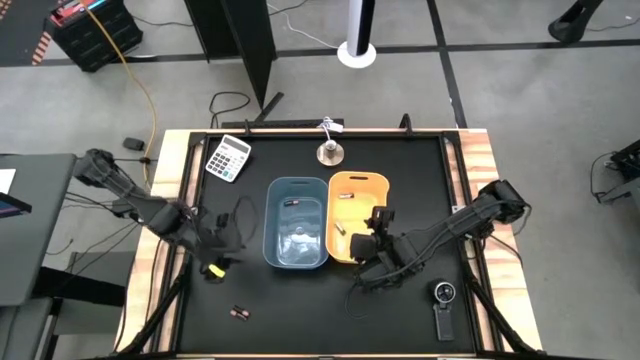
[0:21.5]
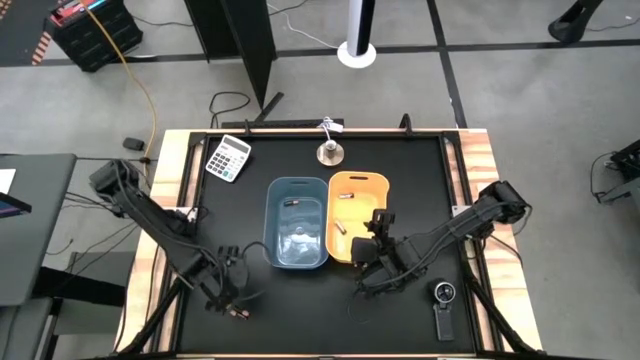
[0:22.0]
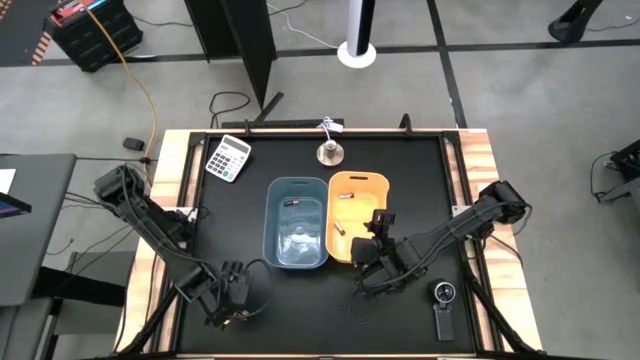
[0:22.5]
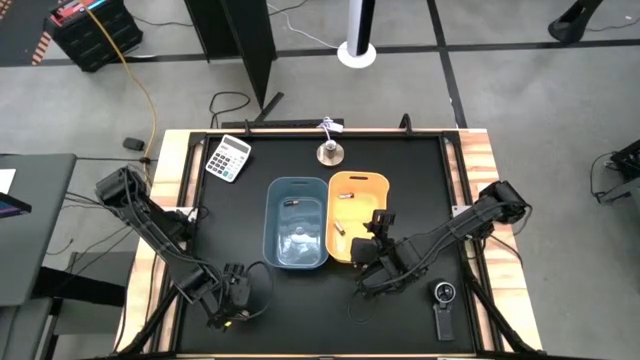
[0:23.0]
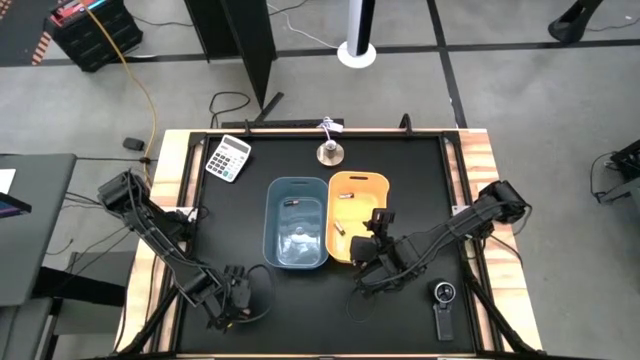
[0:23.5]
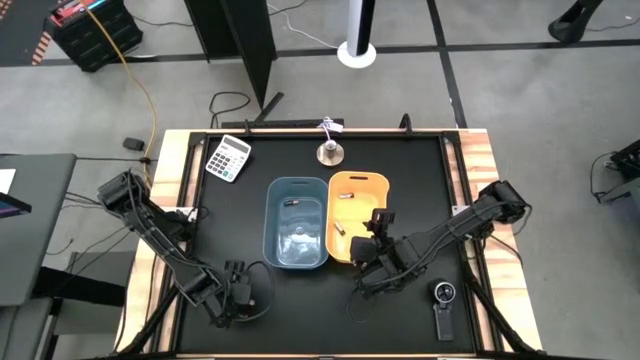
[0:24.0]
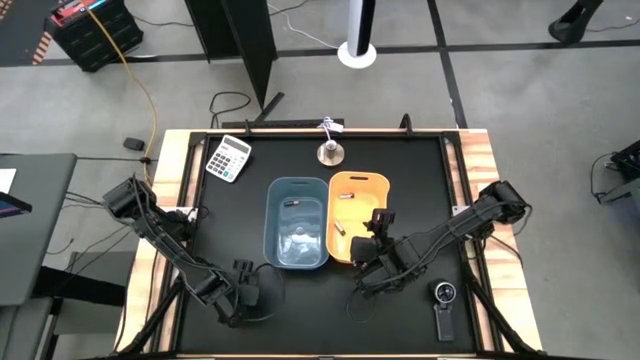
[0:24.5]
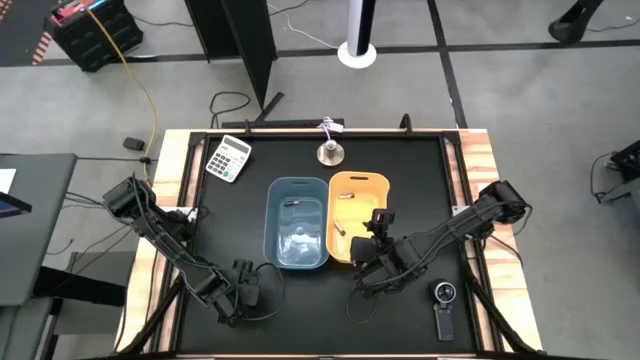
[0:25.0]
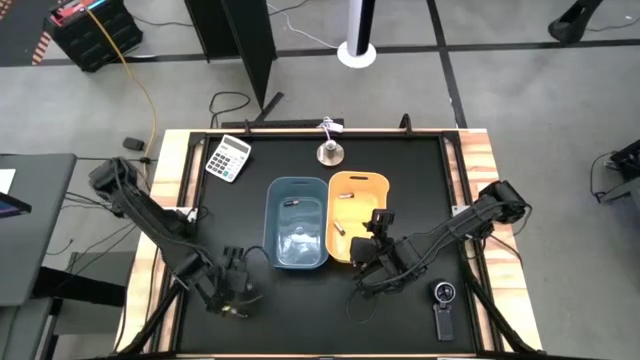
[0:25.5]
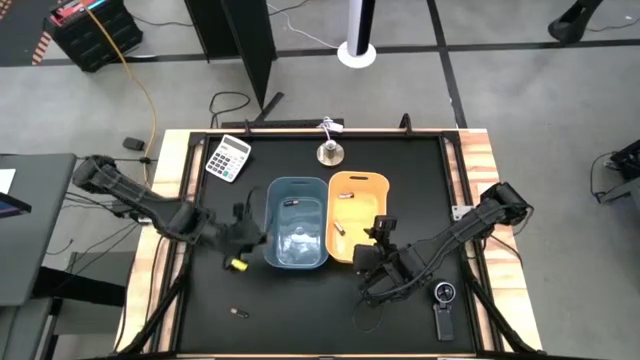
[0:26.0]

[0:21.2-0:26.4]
Task: Sort batteries
Put the top duracell battery into the blue bin

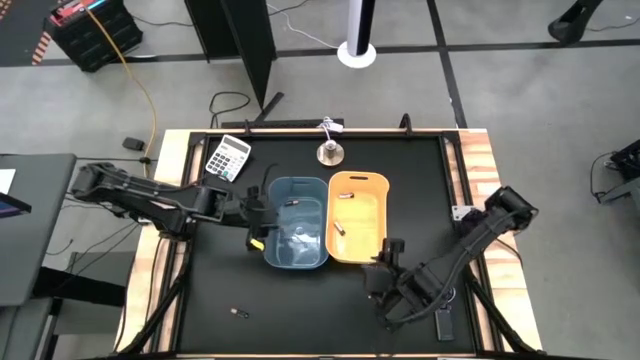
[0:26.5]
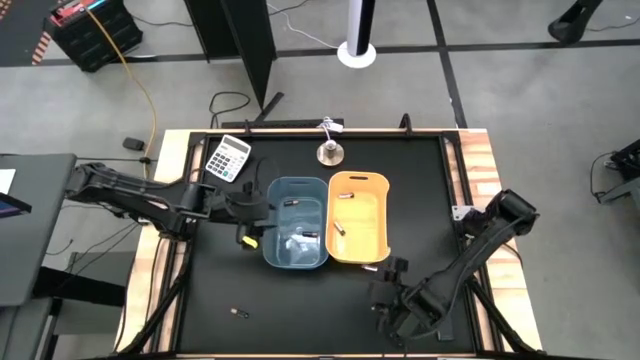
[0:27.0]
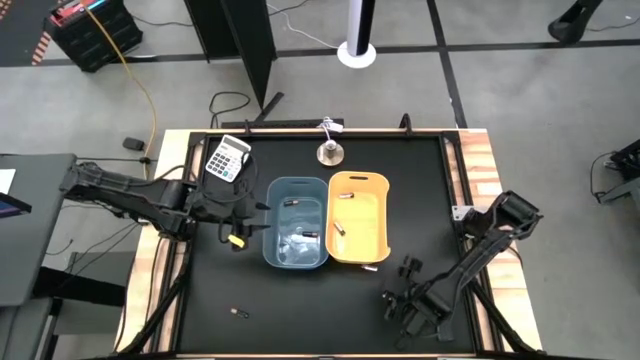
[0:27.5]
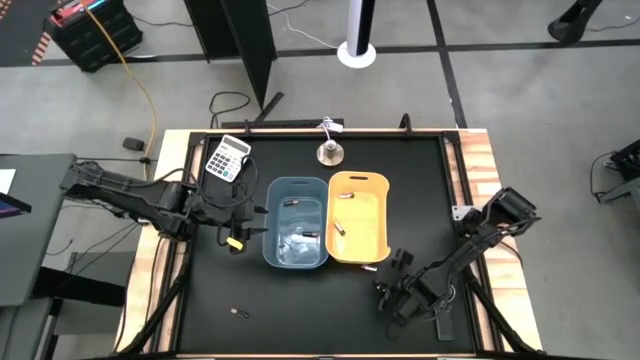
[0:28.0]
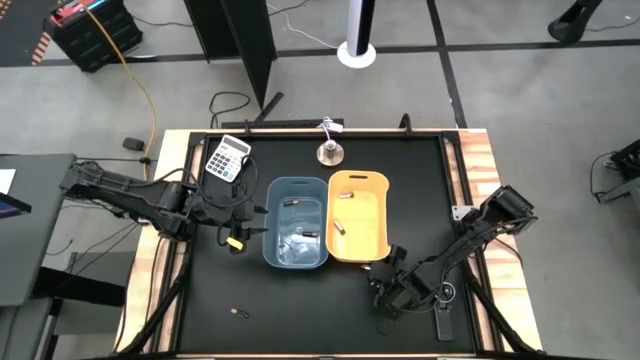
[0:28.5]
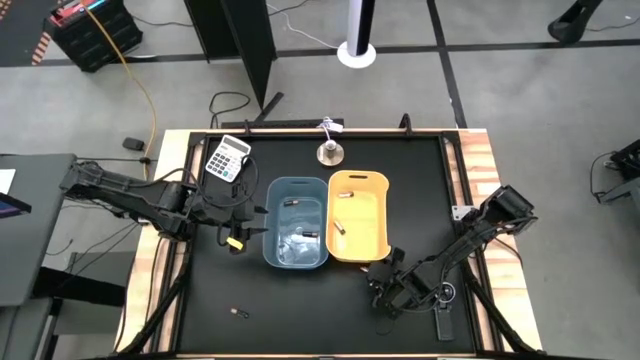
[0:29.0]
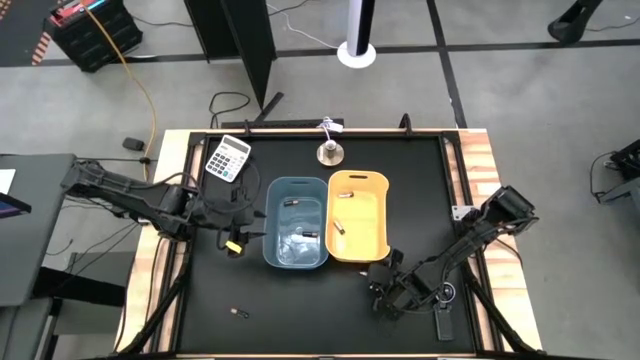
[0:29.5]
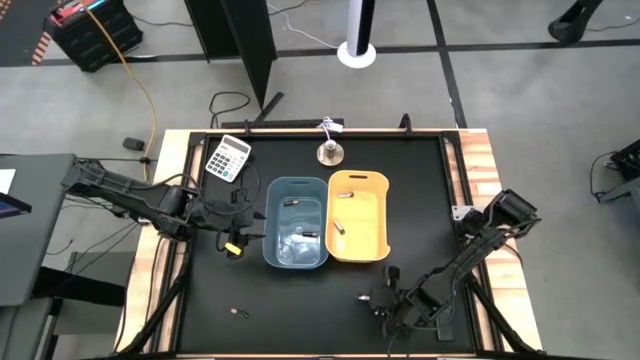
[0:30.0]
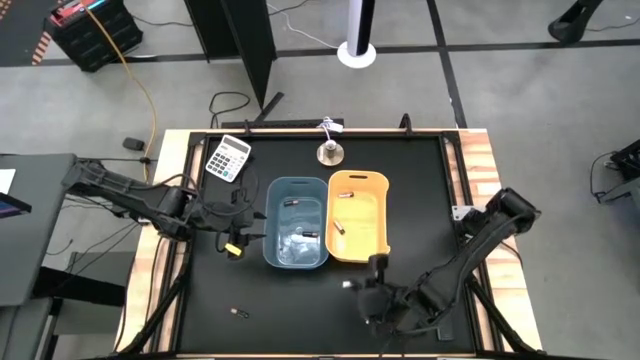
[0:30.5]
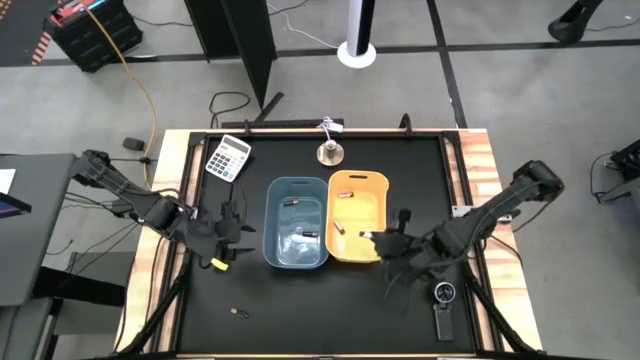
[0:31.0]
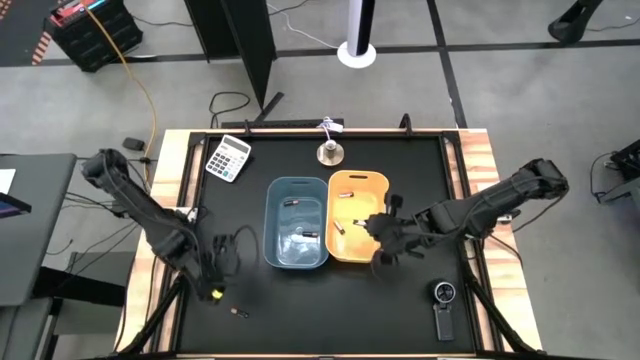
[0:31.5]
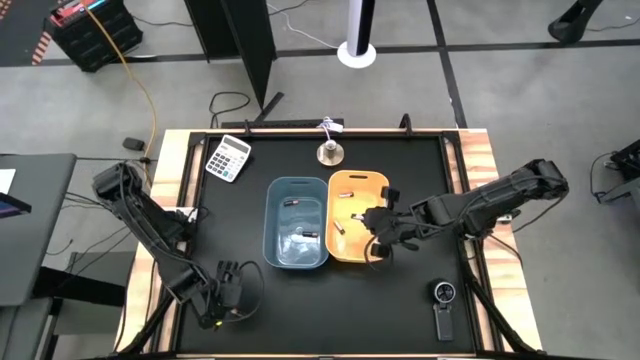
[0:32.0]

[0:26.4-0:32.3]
Put the black battery into the yellow bin

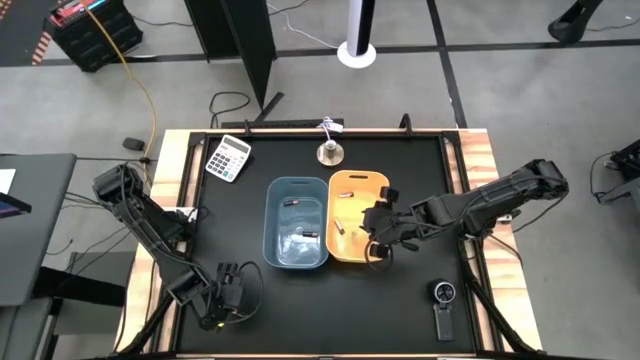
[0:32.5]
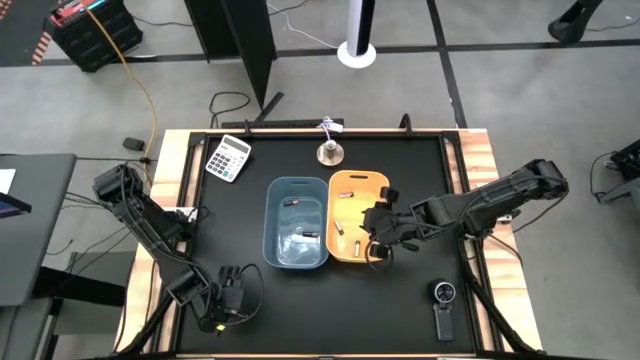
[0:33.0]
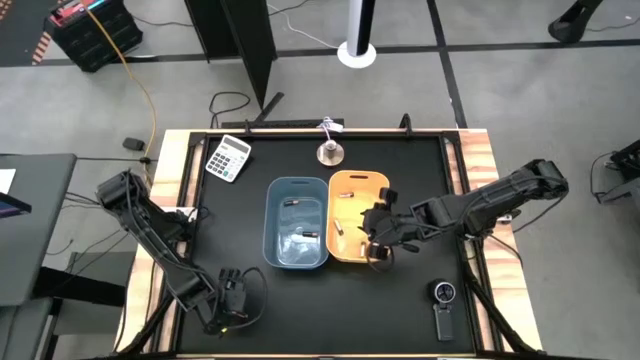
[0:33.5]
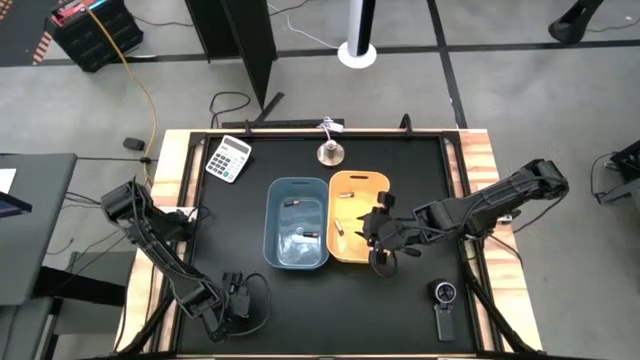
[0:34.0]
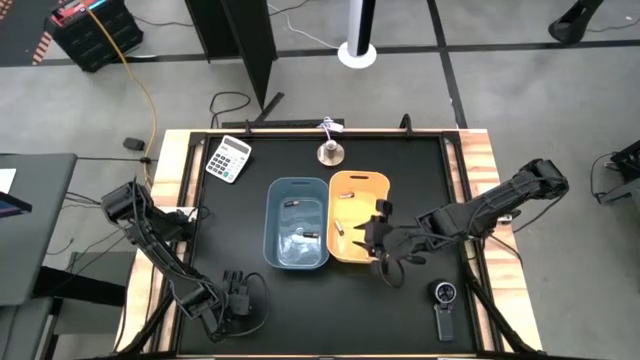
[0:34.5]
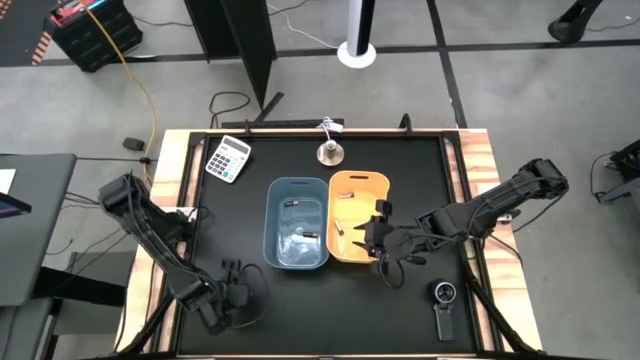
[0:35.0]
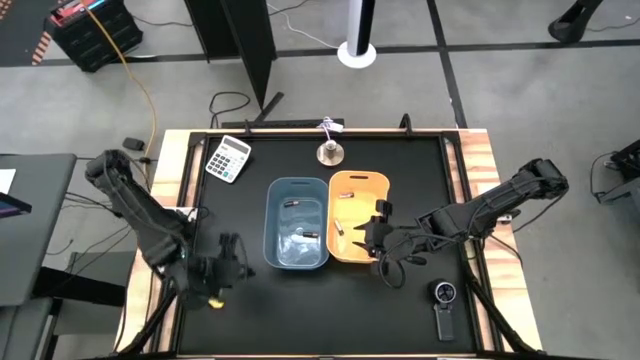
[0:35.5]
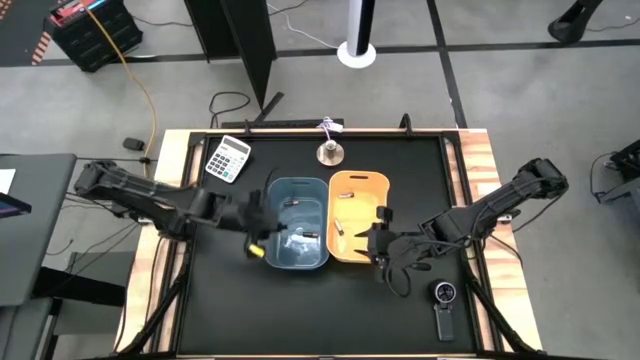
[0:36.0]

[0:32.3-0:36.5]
Put the black battery into the blue bin

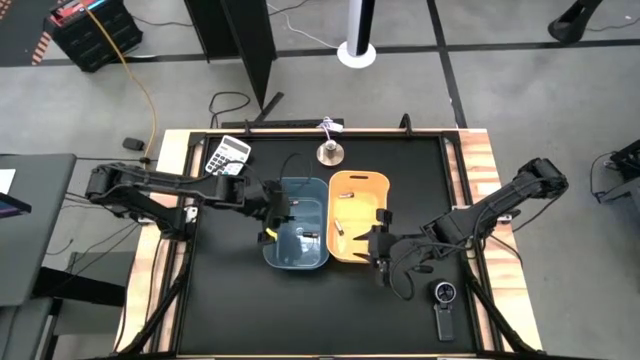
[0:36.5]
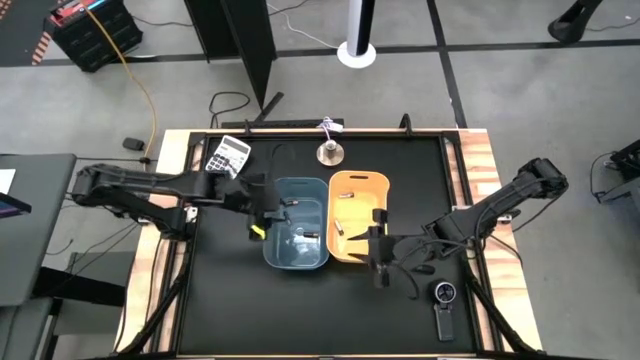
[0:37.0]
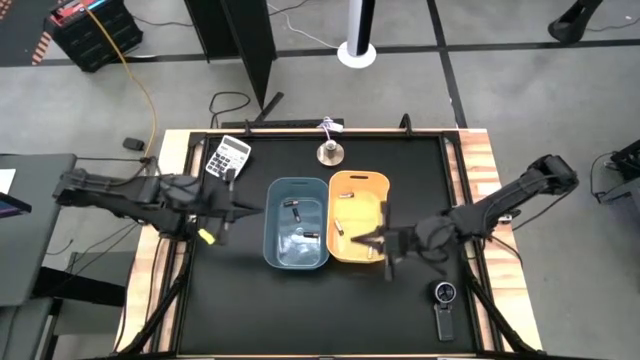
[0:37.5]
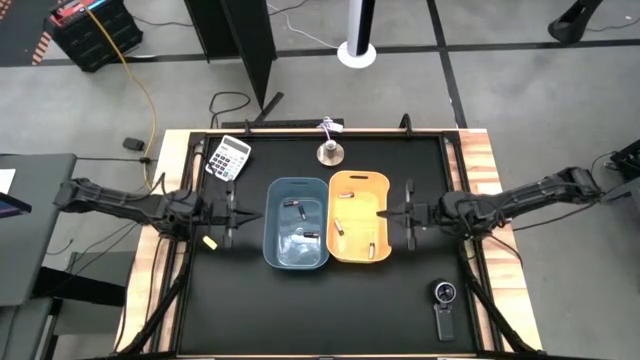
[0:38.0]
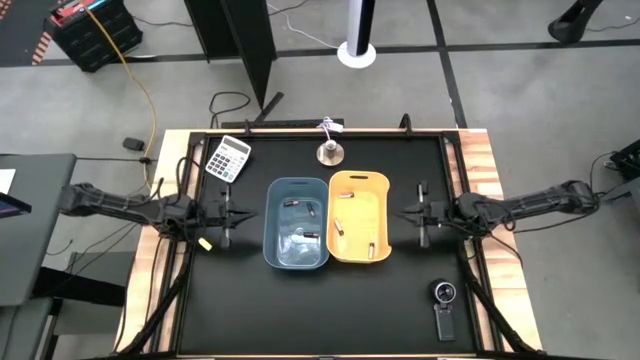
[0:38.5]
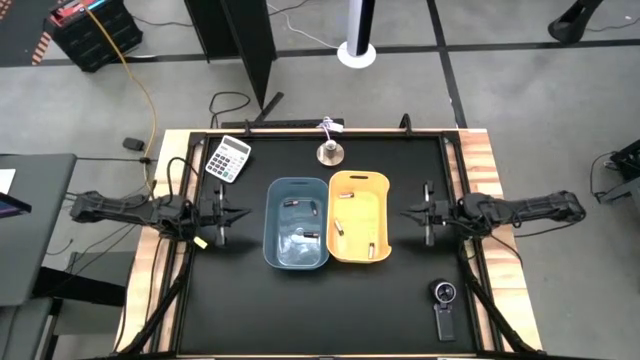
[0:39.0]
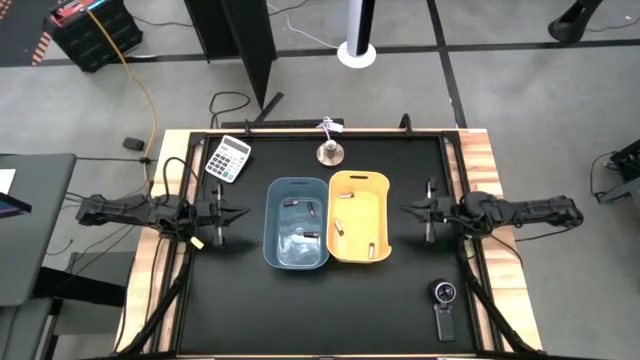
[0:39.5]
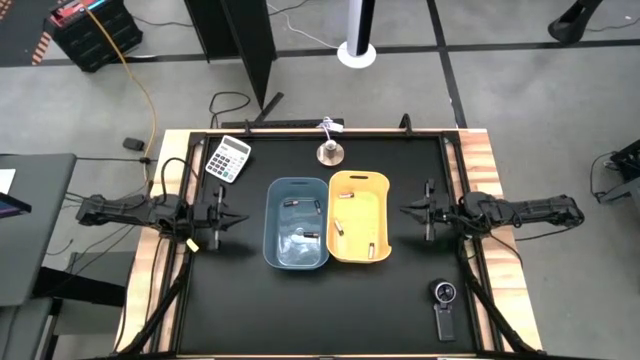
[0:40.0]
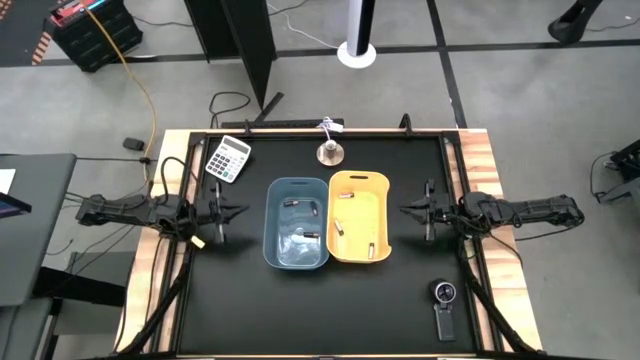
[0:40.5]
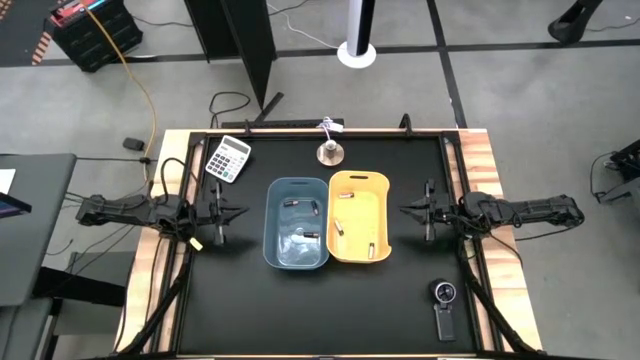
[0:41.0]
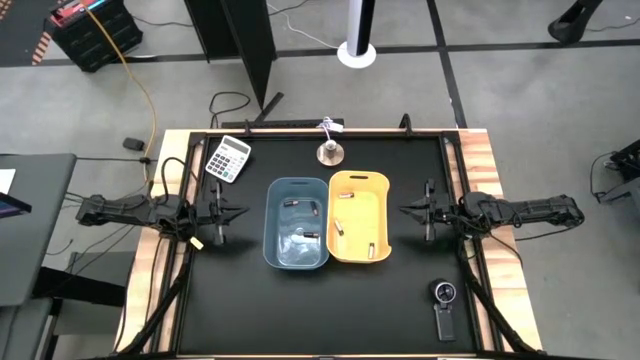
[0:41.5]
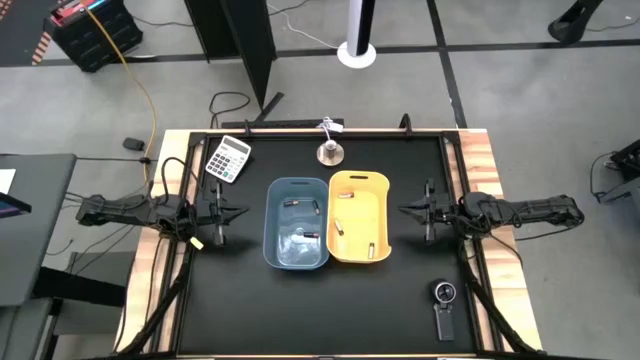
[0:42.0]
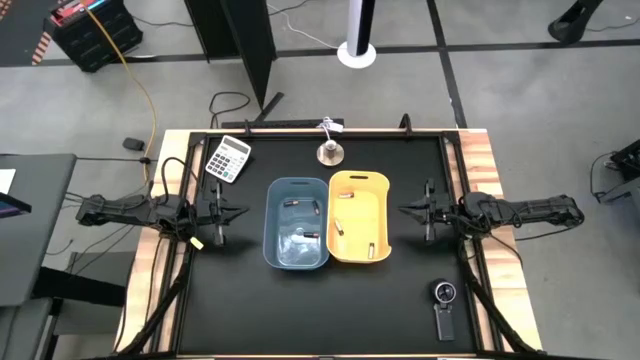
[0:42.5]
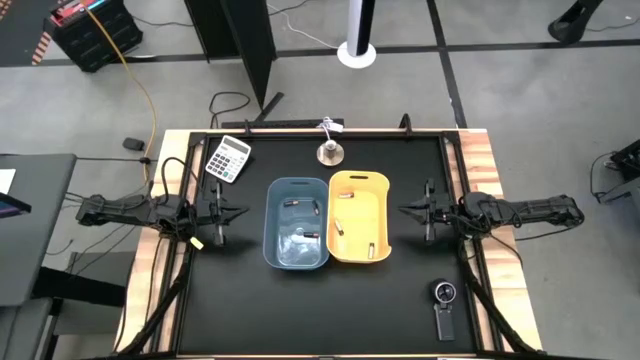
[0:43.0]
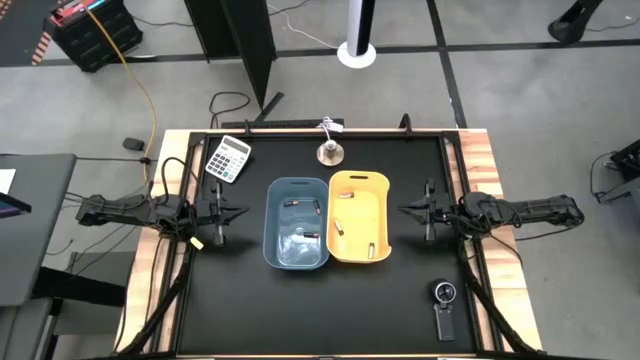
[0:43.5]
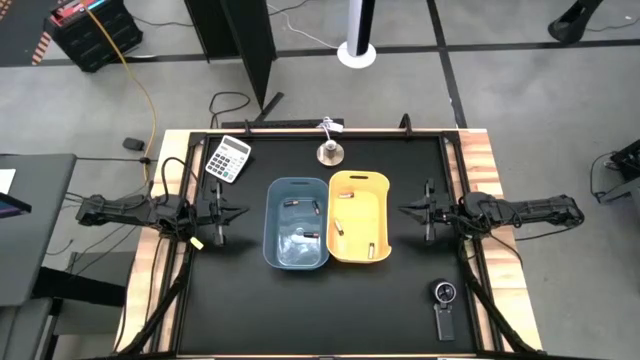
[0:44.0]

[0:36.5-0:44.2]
Return to Home Position
